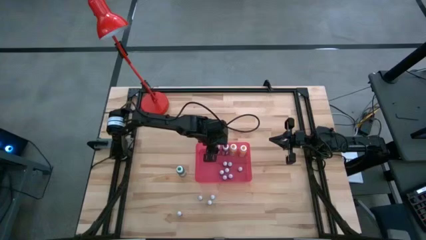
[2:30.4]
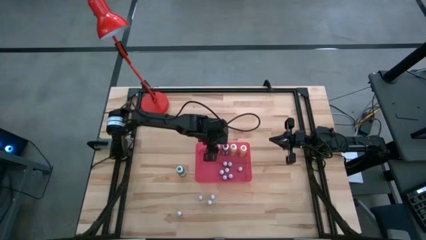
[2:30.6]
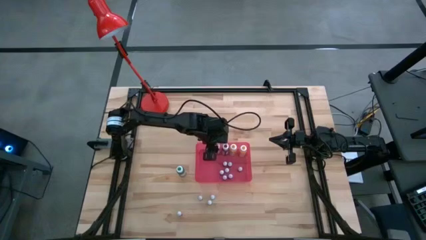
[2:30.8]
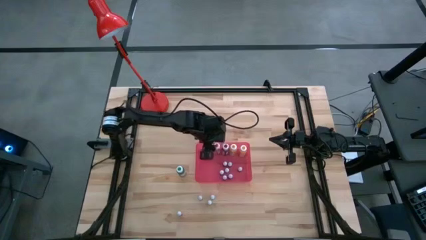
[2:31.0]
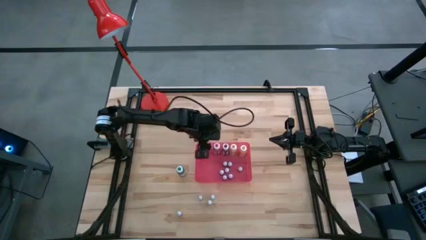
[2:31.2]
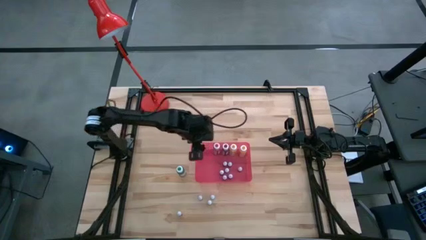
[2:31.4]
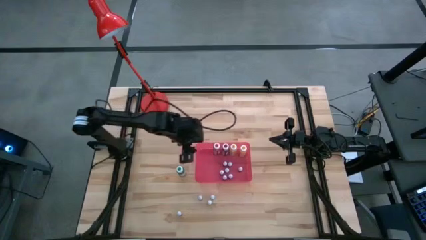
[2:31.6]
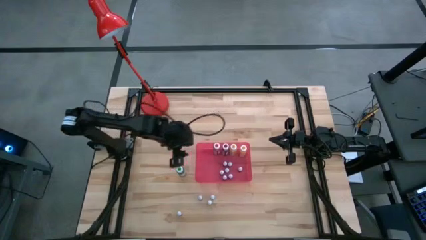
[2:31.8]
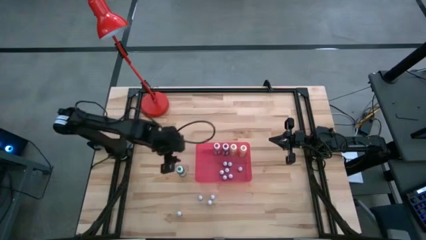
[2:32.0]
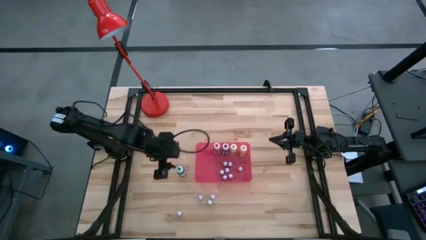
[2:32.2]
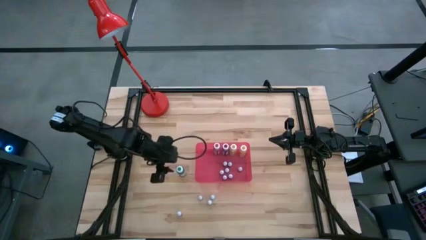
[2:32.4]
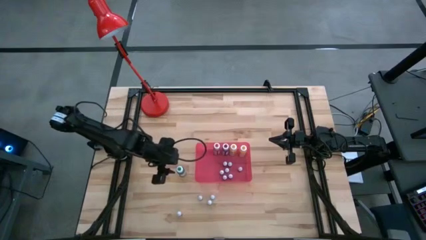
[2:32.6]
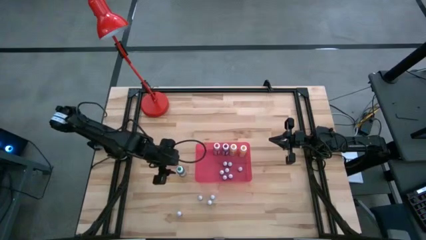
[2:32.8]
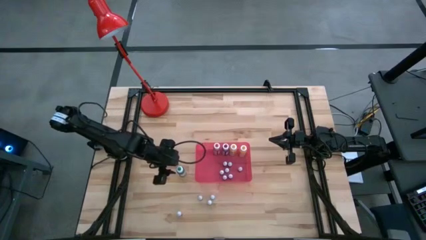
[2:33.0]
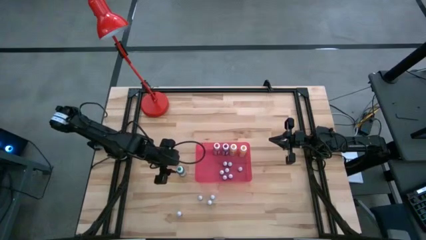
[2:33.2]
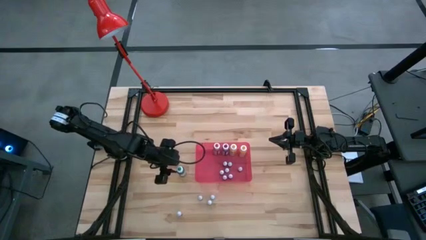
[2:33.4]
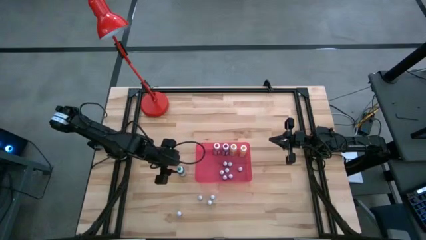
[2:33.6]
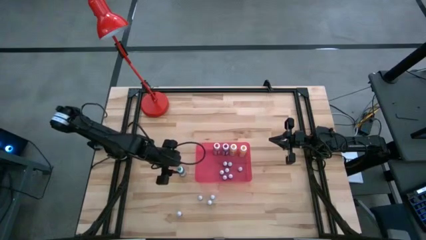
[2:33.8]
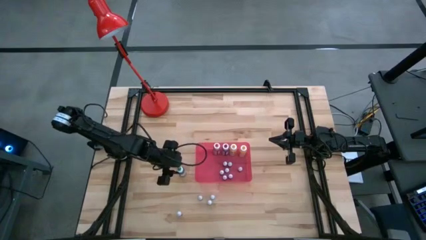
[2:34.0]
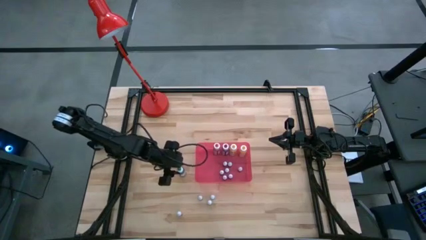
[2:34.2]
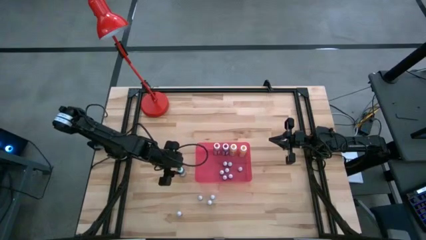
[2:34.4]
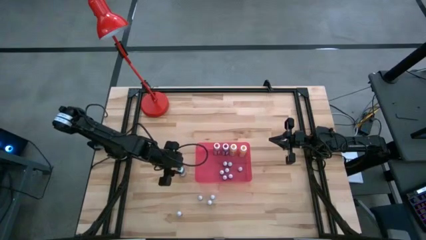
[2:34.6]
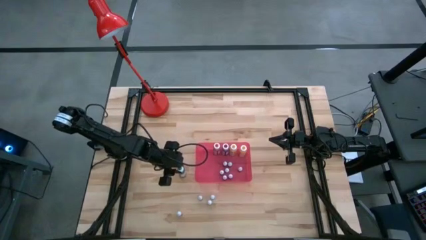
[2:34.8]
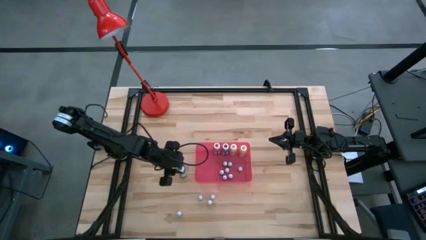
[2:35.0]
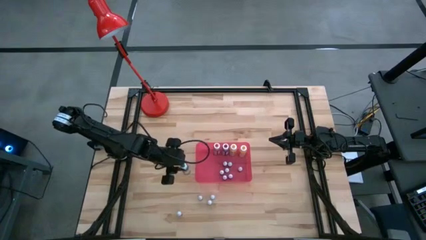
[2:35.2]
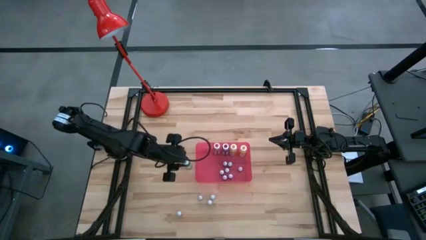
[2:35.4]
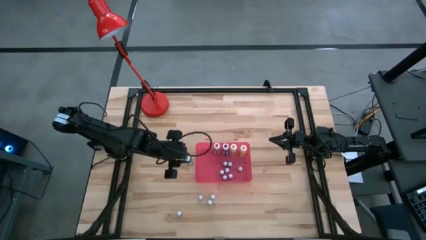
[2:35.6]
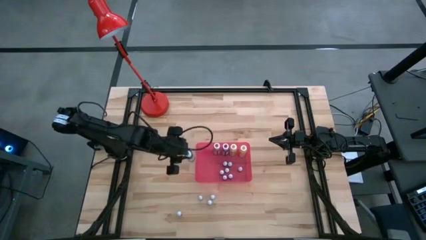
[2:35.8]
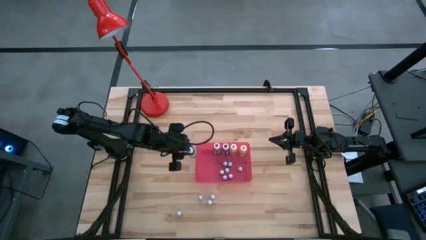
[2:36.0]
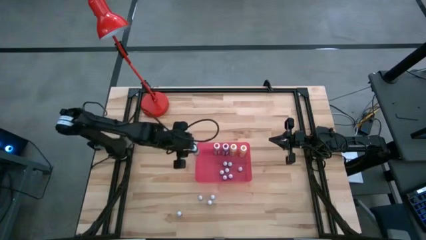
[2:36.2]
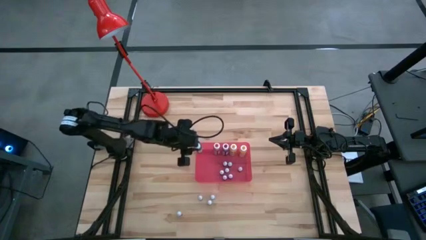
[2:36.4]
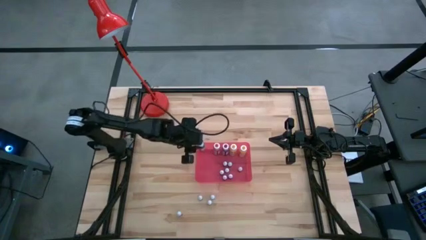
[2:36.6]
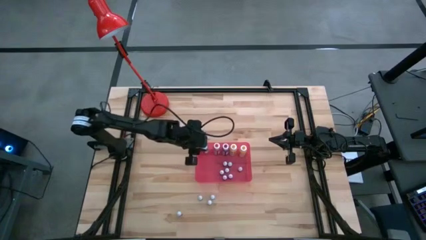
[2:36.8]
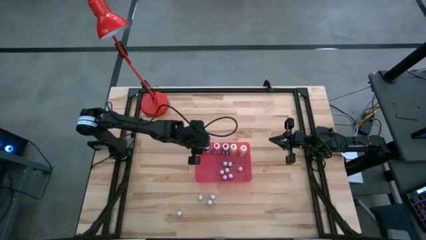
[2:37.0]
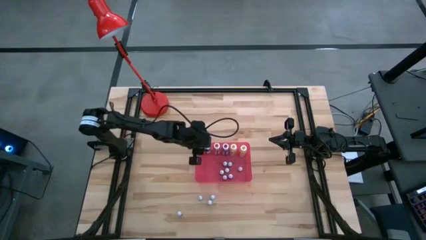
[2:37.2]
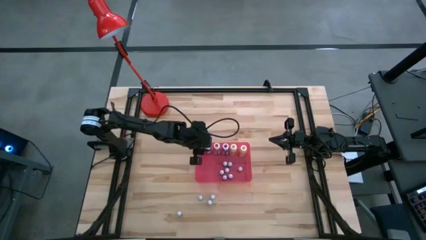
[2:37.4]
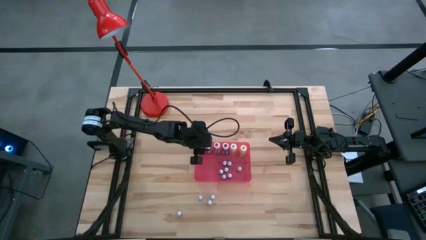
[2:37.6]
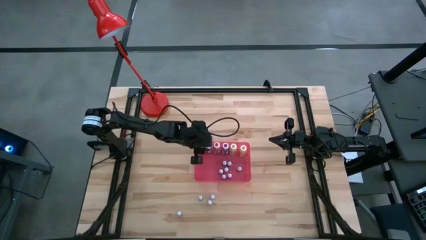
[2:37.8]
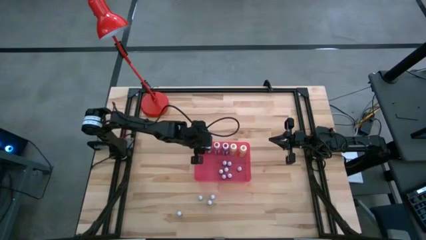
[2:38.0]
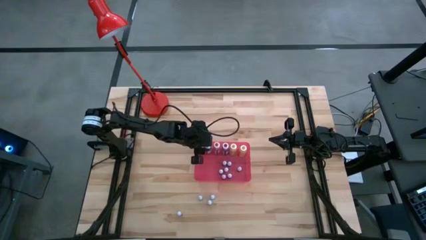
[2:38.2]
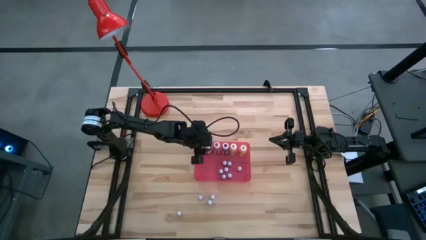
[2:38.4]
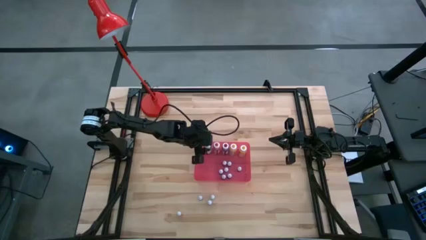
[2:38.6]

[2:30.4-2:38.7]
Task: Pick & Place food coloring
Put the large green food coloring bottle into the container

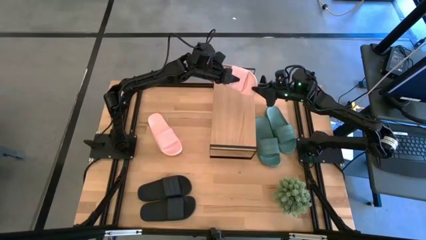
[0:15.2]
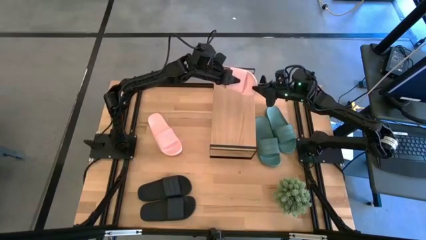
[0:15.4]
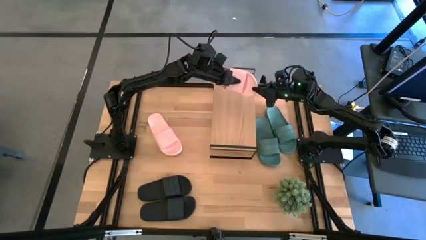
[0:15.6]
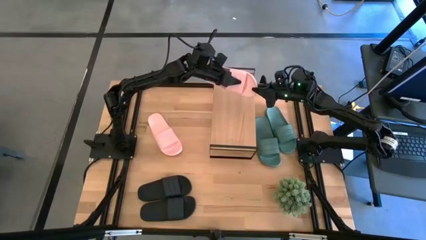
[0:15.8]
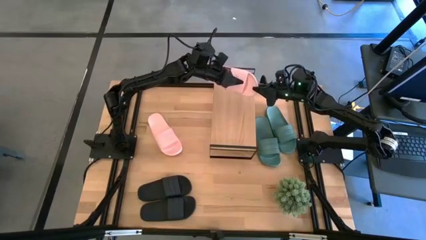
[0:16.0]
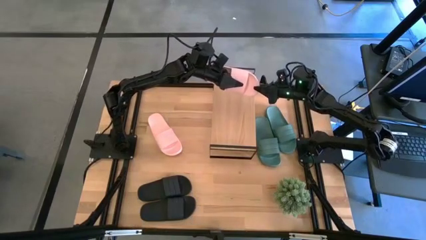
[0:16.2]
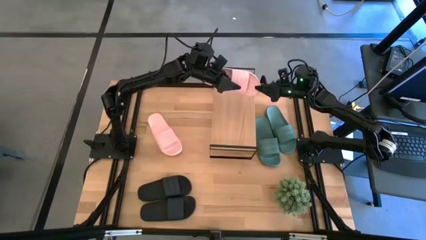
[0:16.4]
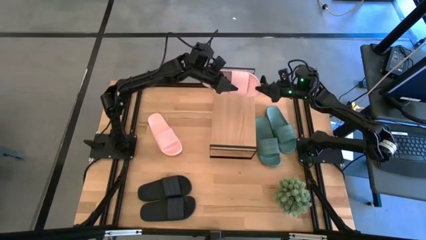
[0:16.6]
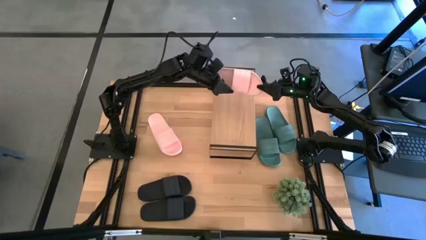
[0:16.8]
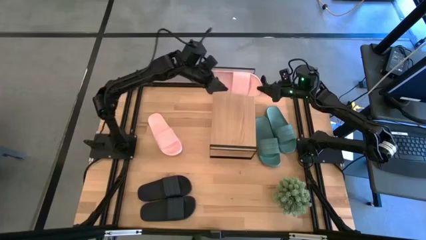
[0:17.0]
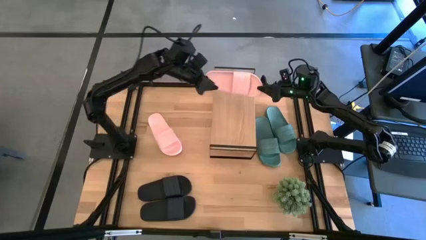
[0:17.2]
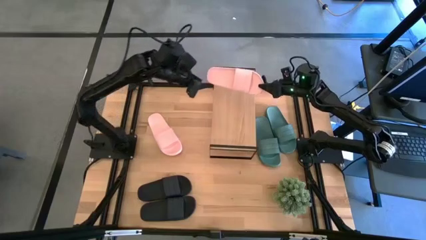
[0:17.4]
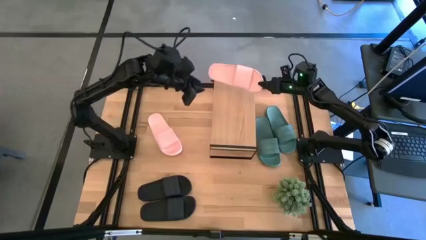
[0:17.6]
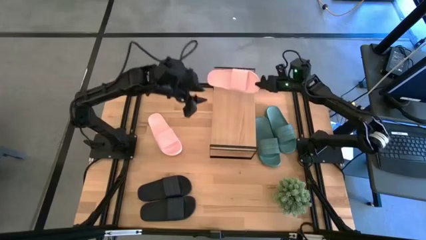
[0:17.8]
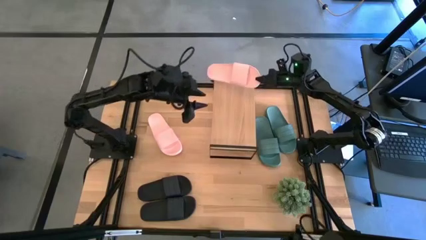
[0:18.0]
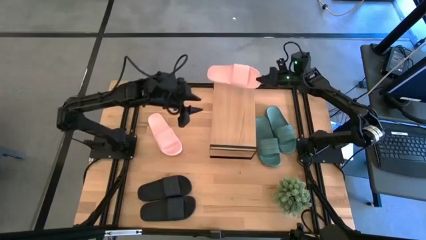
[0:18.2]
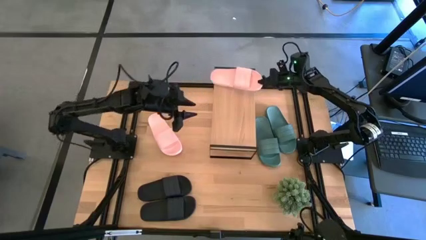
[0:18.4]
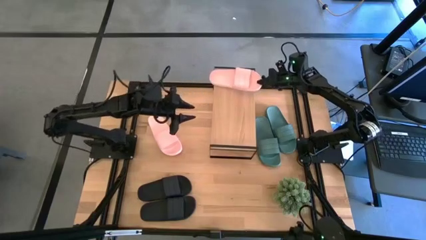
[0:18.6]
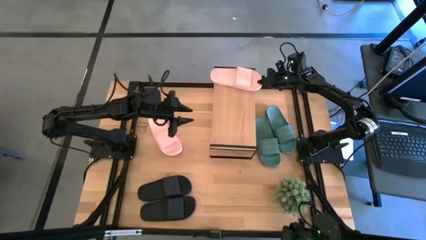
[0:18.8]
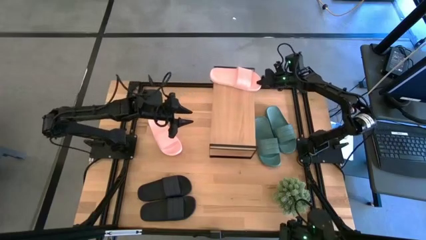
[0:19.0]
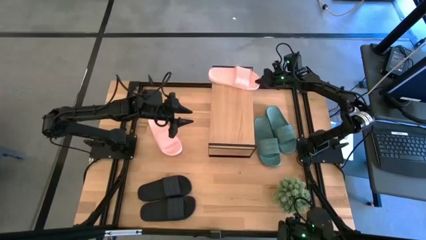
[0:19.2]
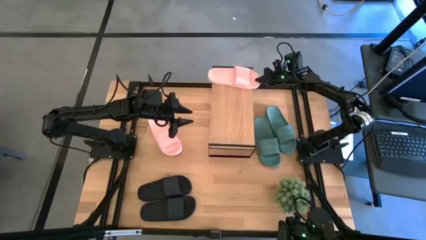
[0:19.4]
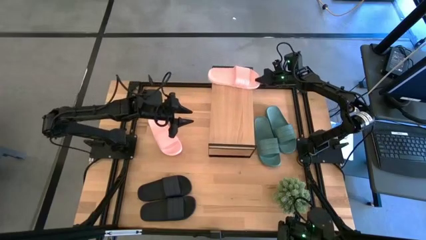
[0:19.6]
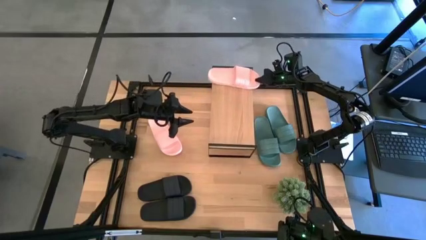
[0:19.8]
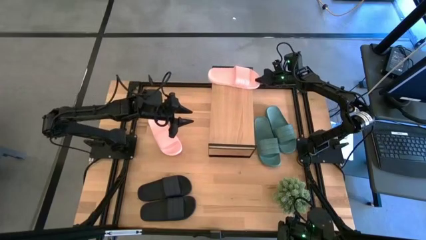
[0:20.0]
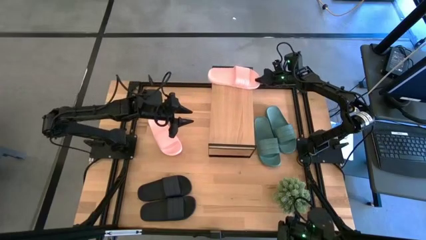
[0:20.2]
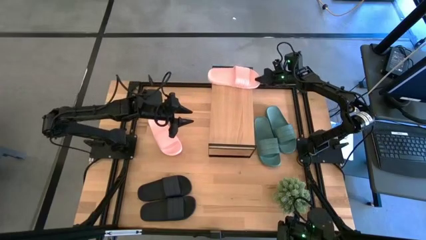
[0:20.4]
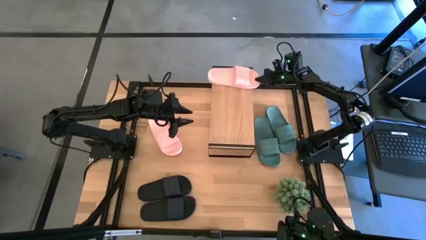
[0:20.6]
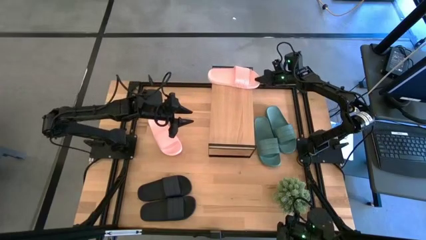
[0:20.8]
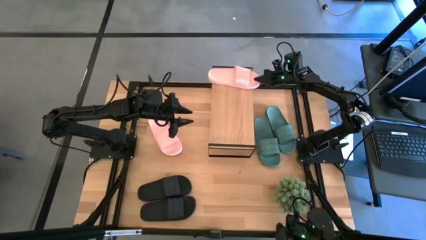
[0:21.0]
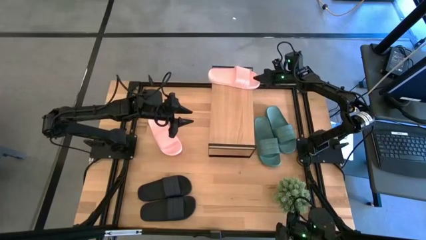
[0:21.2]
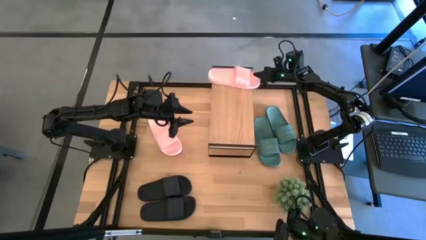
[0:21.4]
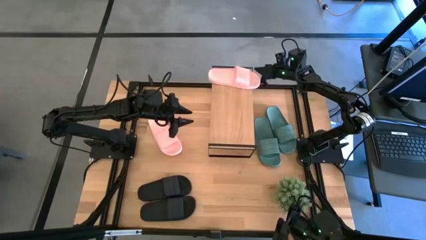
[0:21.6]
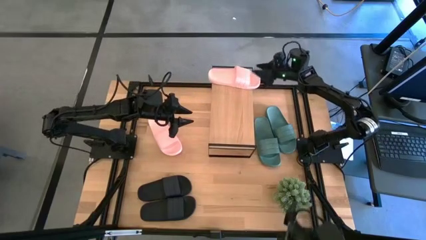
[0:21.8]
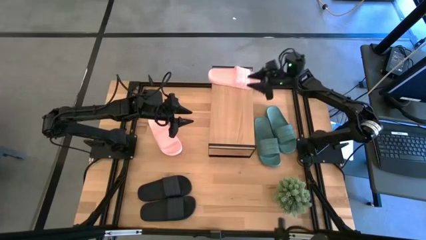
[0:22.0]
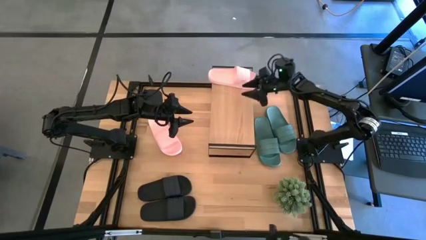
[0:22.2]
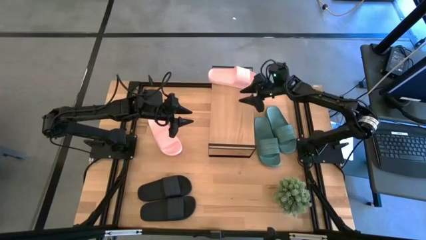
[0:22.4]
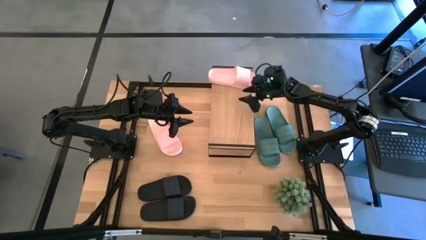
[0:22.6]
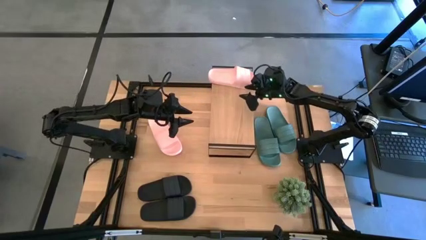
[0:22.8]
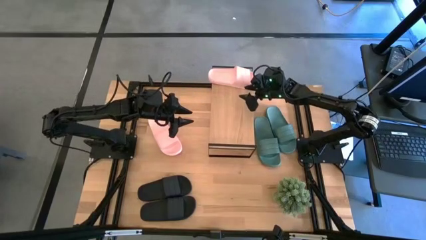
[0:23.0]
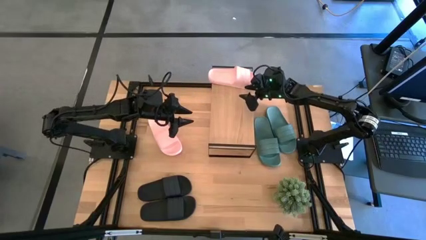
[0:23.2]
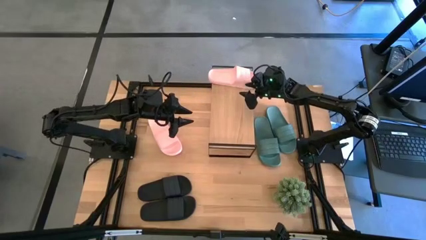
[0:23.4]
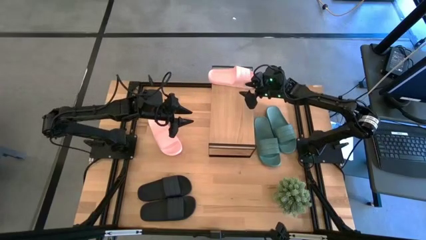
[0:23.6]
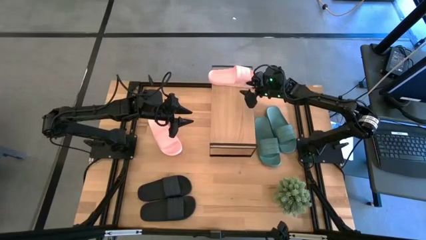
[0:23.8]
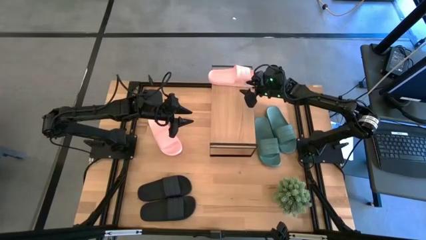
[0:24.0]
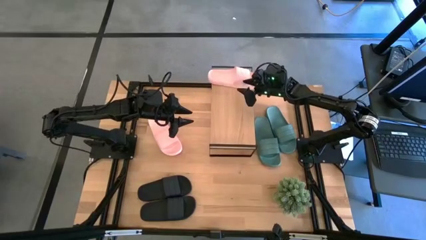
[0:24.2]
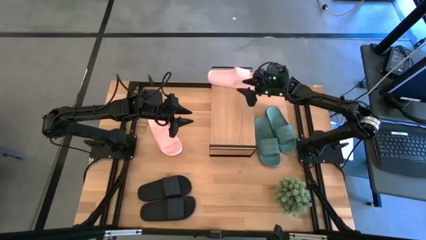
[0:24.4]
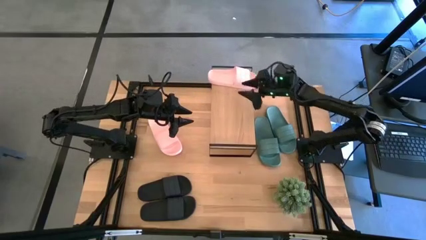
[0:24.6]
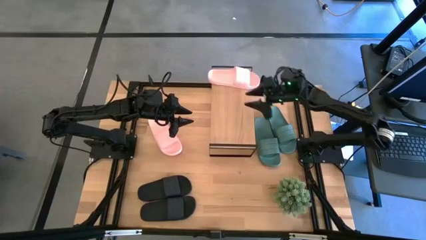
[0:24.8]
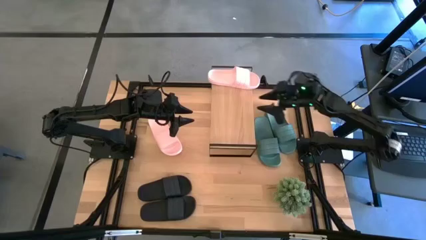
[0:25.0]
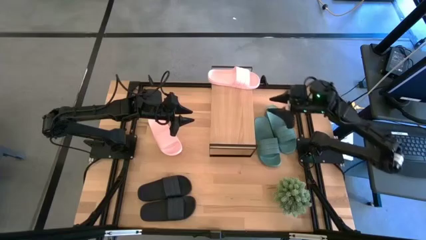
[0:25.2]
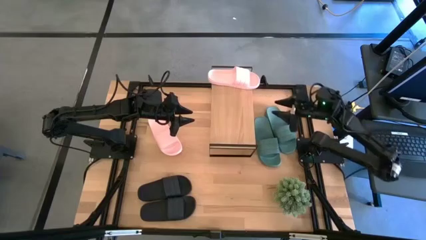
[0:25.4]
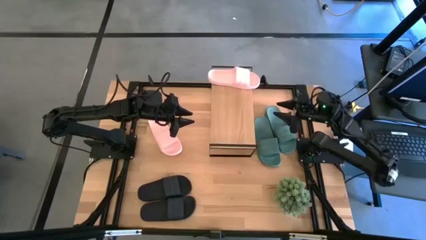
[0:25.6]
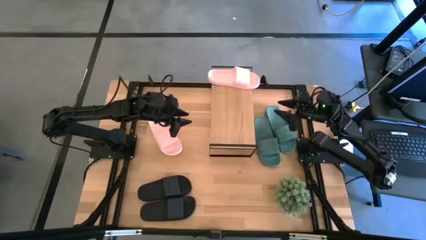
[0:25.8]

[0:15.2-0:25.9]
Task: Pick and place slides into the shelf
Put the right pink slide on the shelf
